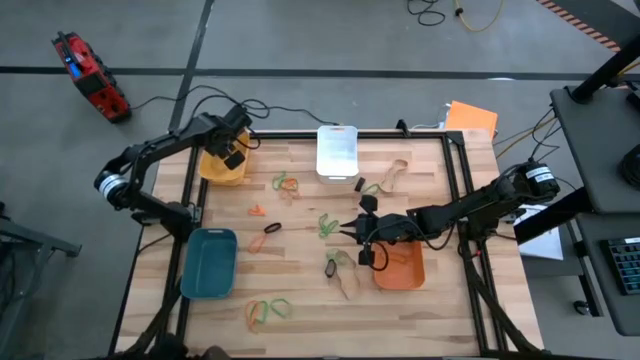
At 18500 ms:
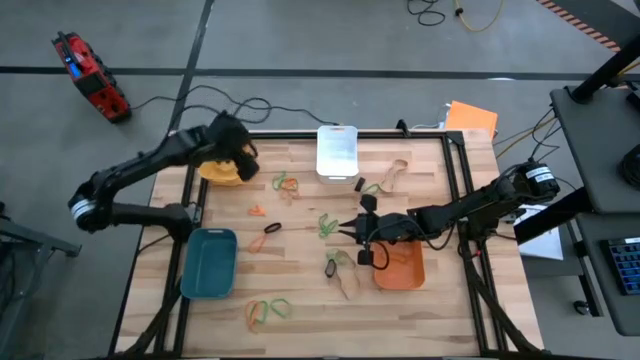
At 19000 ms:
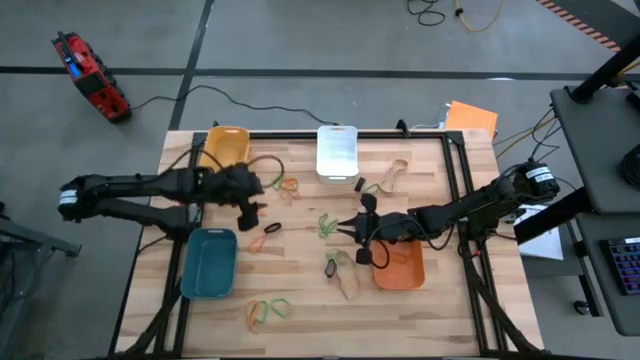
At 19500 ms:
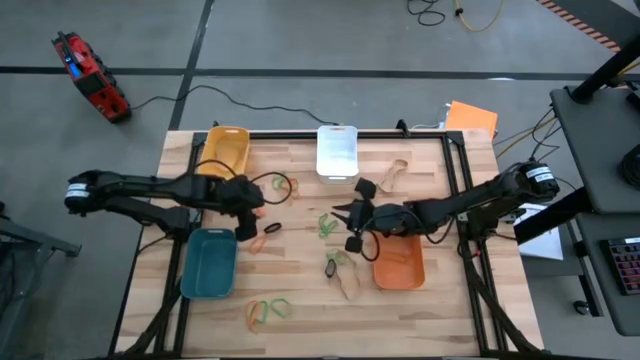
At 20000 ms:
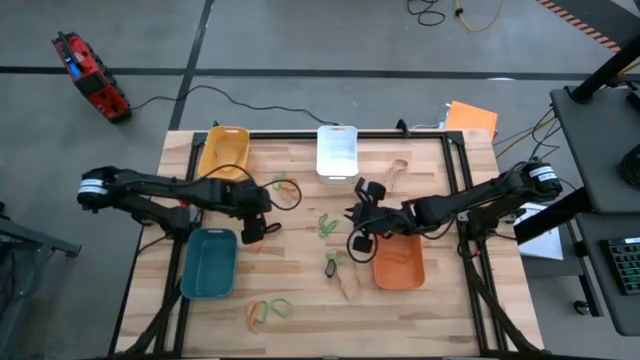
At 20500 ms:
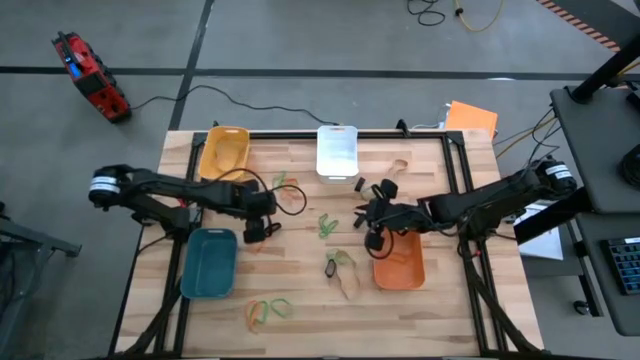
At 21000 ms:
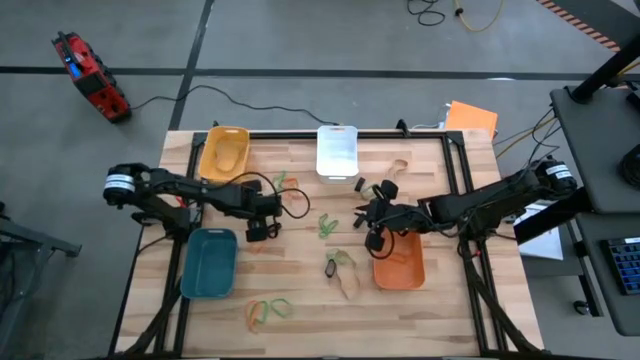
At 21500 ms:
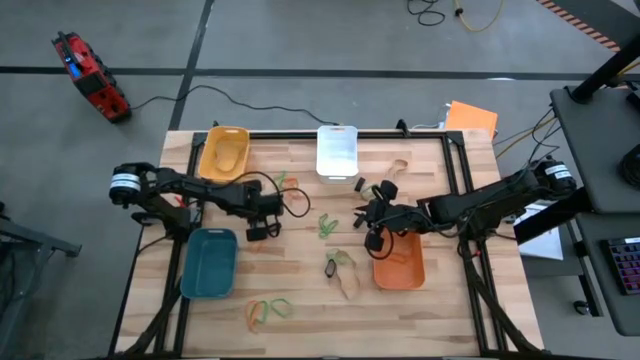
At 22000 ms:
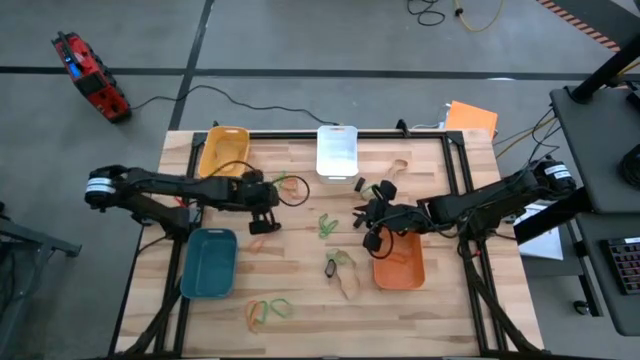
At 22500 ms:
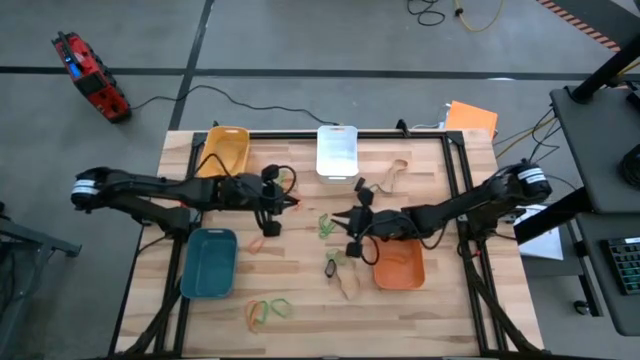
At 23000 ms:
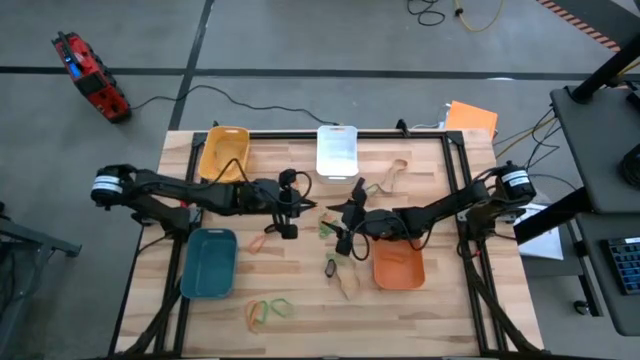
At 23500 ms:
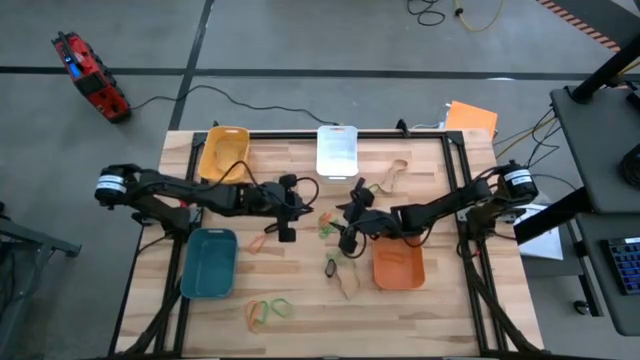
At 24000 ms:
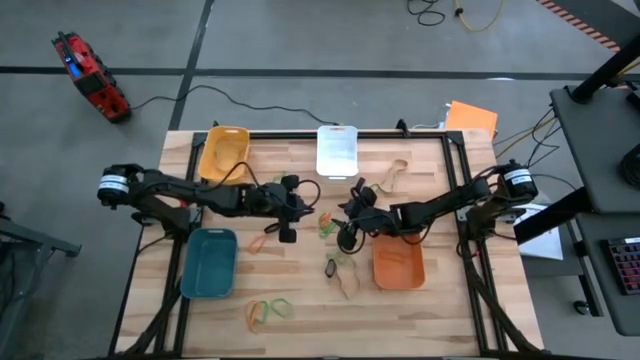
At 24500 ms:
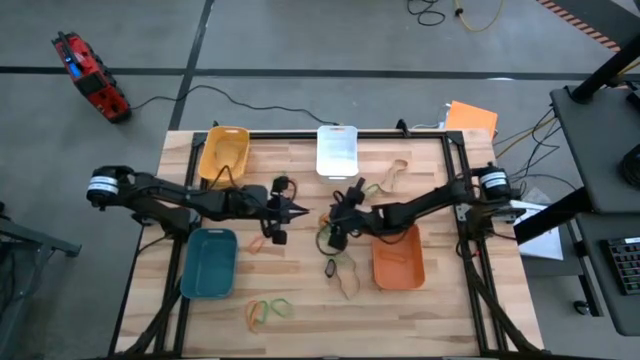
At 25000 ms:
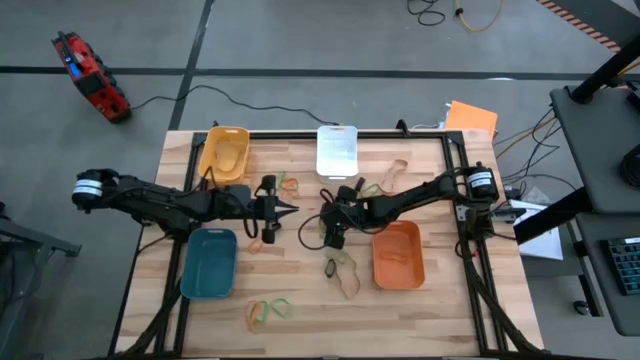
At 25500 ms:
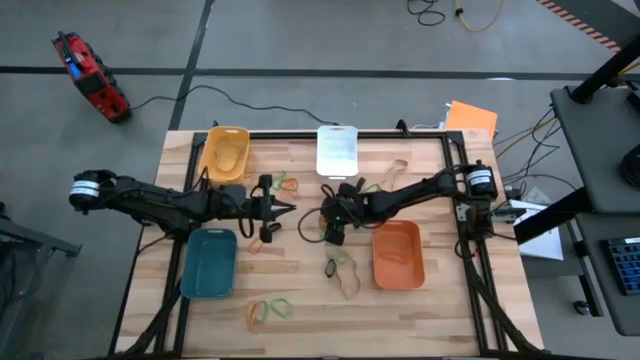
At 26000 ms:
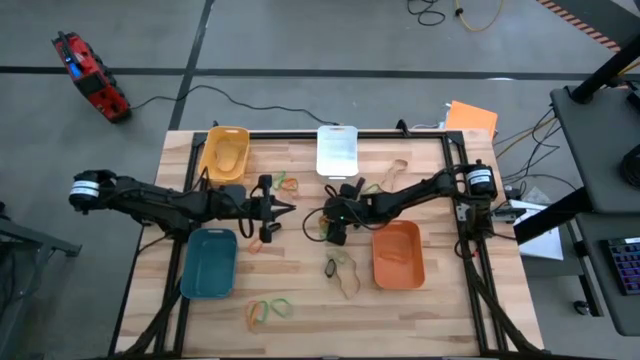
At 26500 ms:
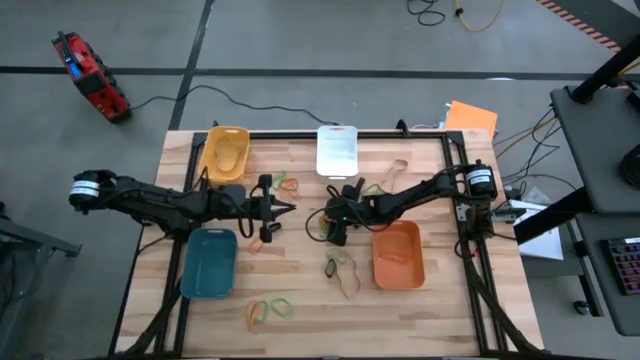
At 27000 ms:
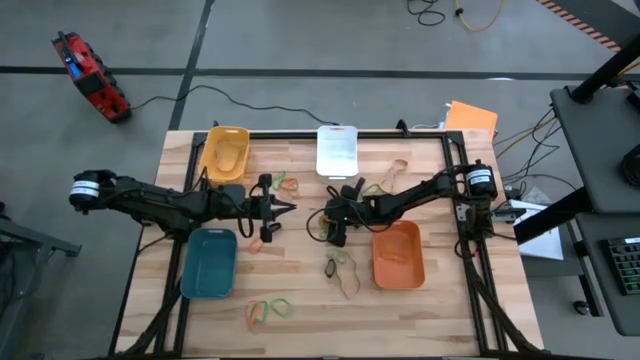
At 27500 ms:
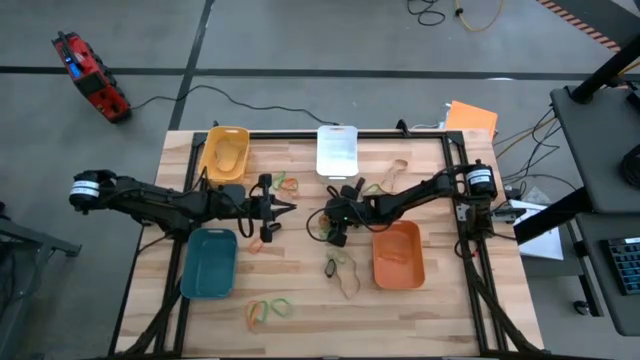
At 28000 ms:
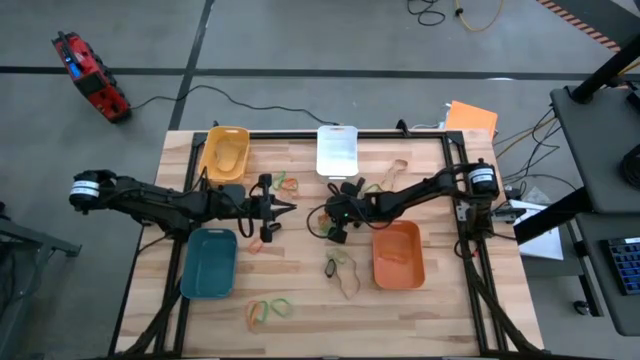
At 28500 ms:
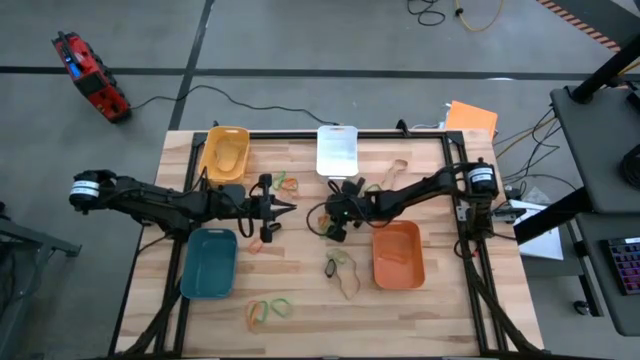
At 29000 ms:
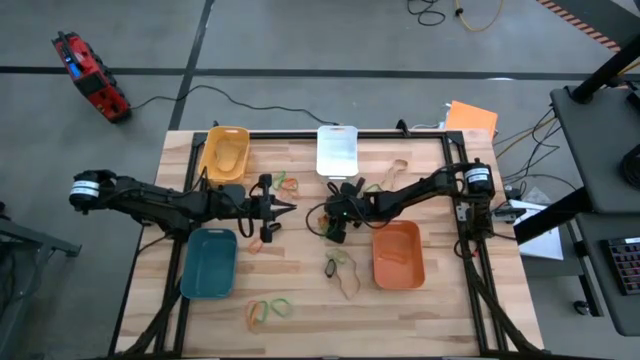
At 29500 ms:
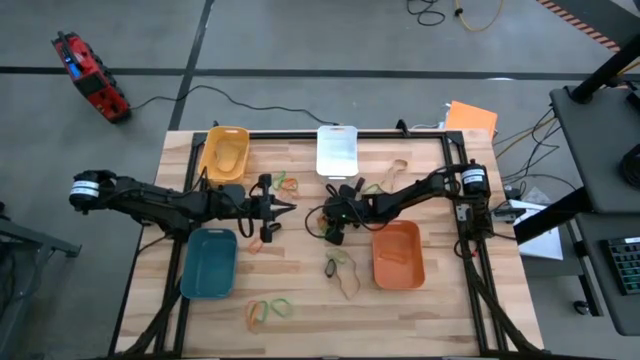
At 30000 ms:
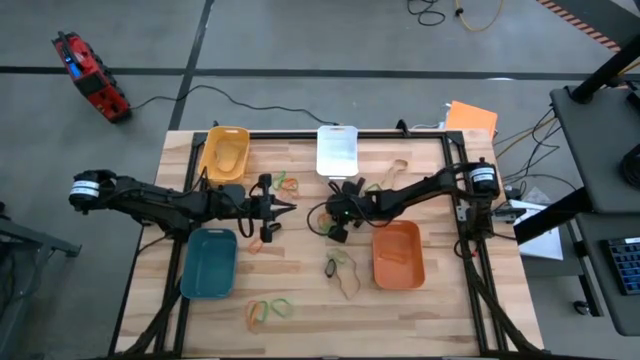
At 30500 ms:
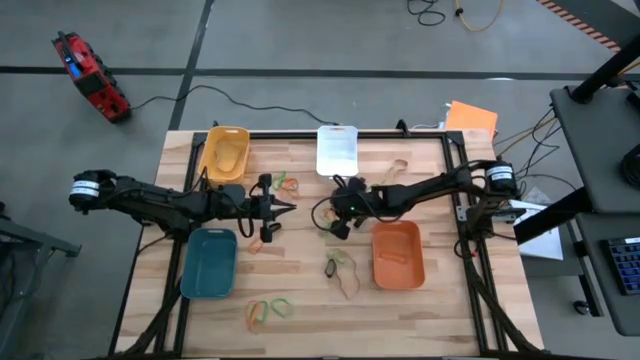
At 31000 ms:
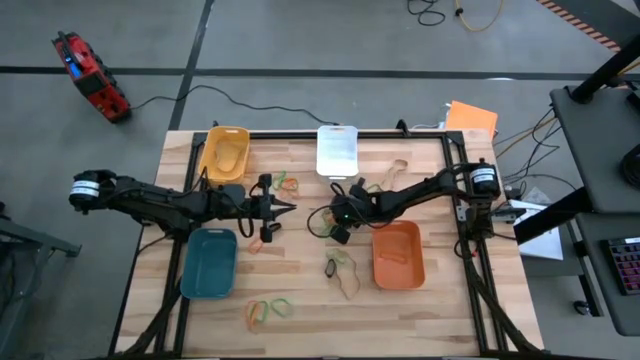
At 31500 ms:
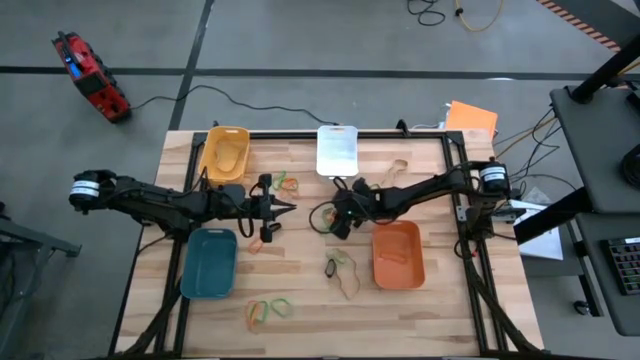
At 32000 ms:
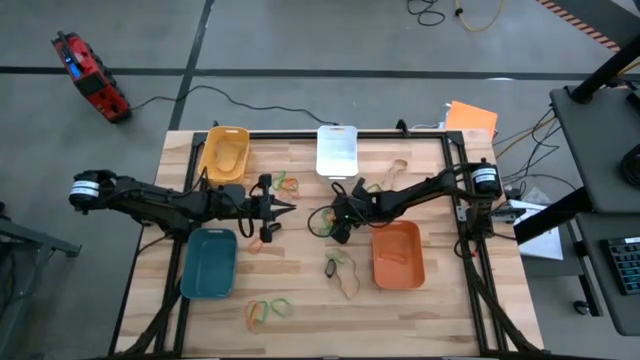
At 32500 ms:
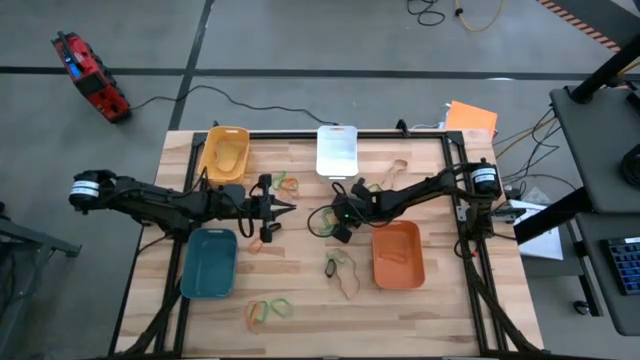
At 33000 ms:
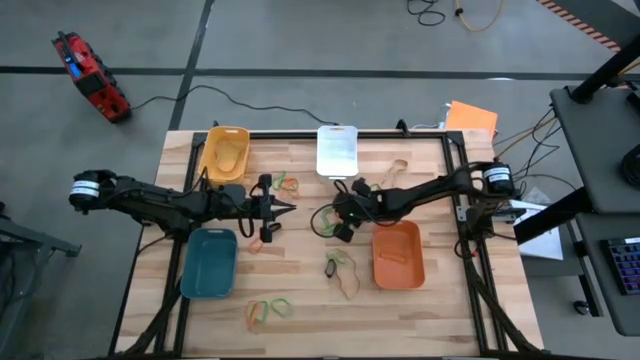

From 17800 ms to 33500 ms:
Task: Sort rubber bands into baskets
Put the orange rubber band into the orange bin

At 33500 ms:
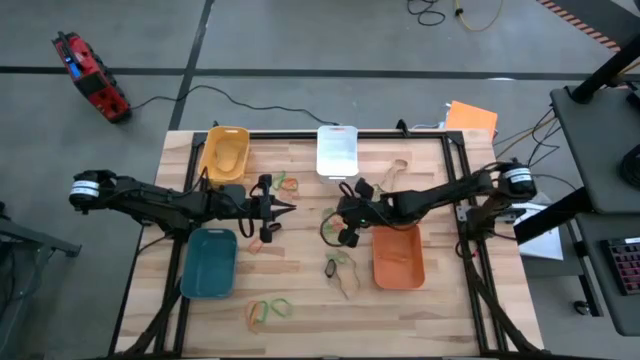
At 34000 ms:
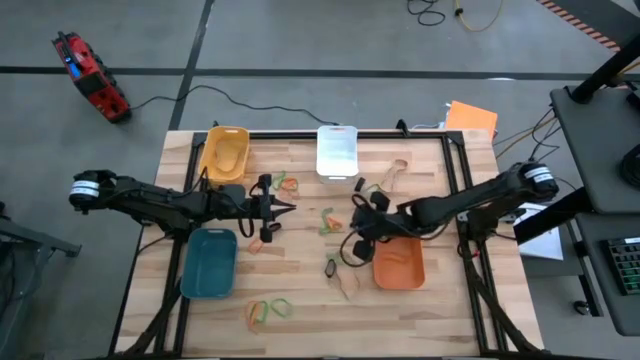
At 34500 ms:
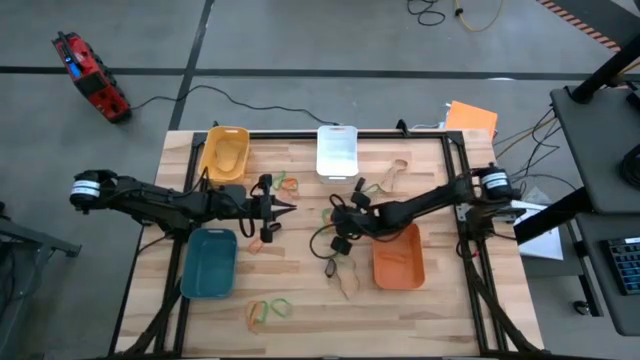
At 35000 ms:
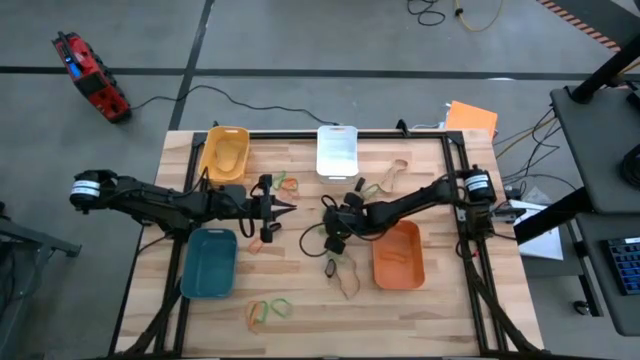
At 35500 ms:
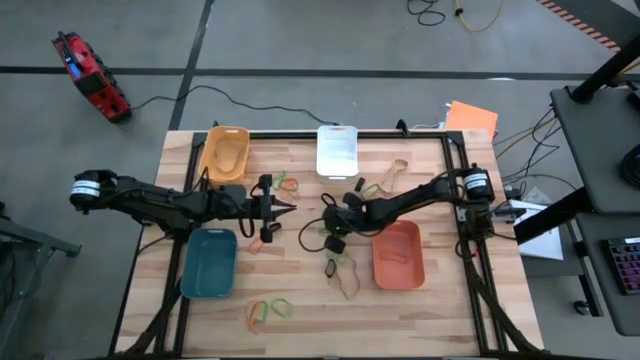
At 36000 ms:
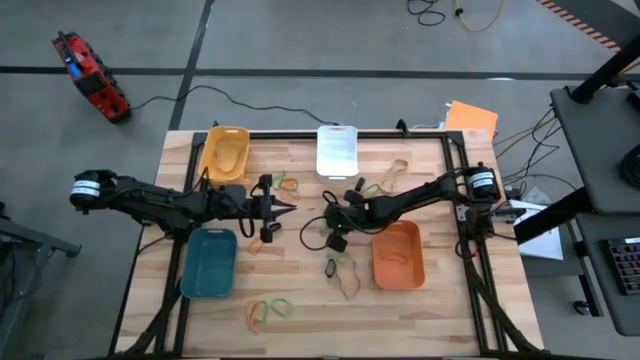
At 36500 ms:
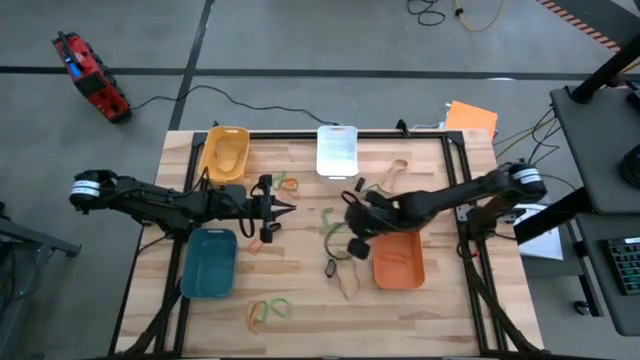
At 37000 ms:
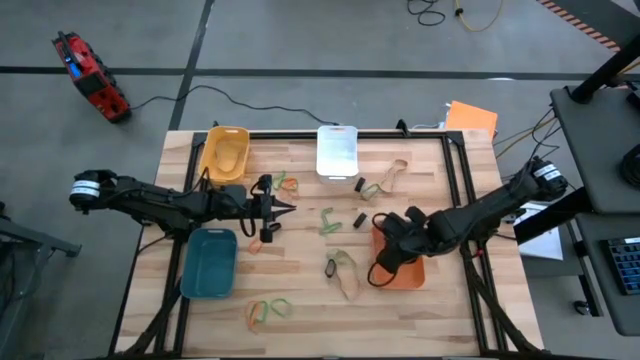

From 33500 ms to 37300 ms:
Put the orange rubber band into the orange bin

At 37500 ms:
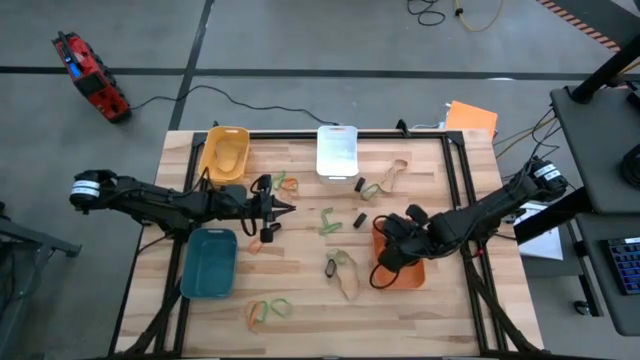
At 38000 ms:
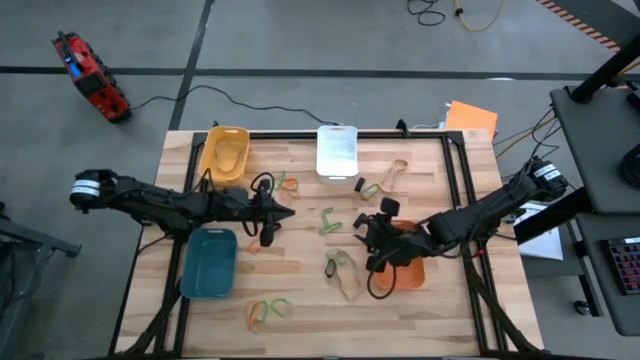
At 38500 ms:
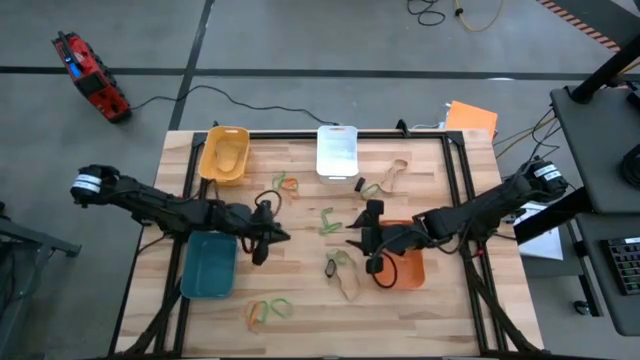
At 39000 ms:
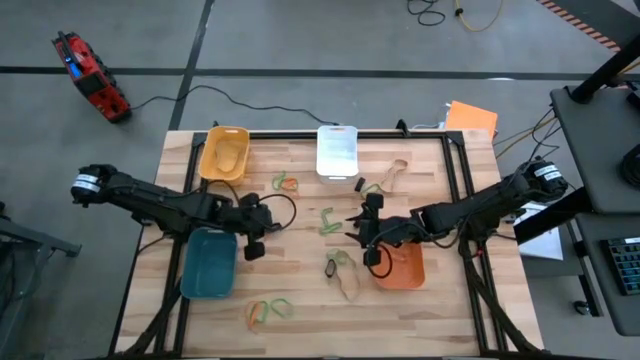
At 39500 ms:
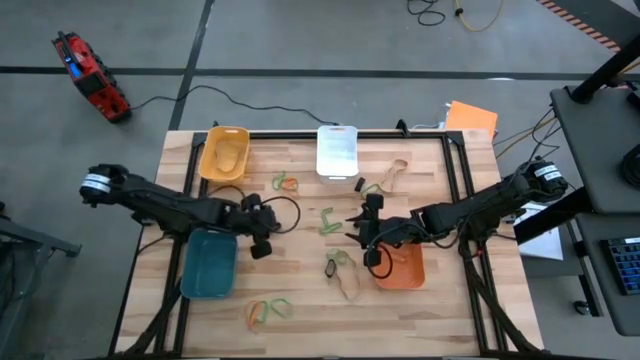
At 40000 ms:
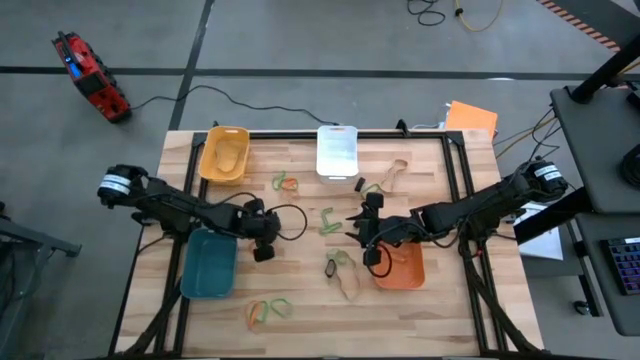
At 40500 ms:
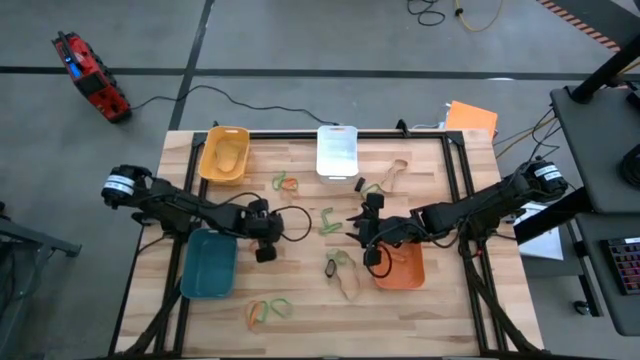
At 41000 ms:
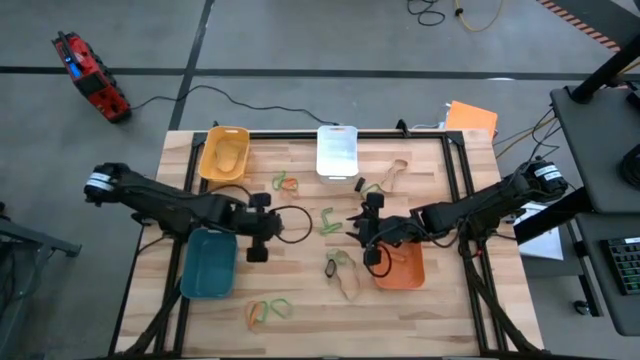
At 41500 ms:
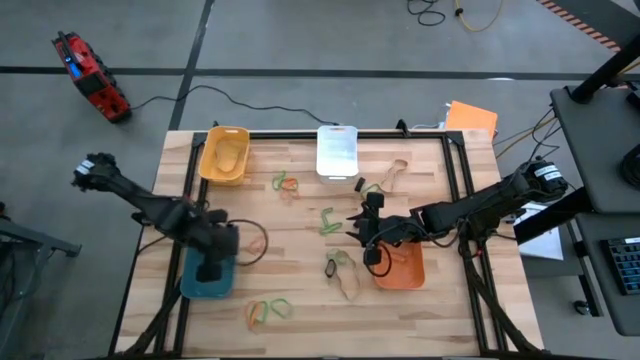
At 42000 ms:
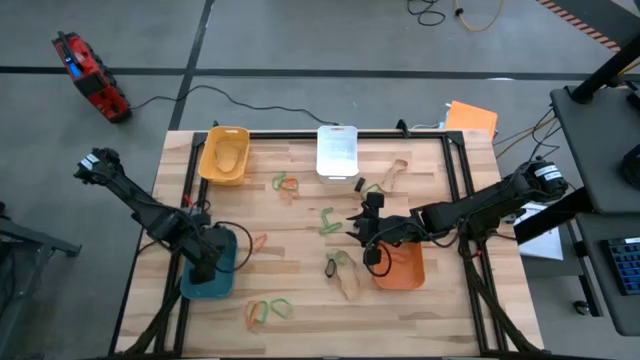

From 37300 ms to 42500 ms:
Put the black rubber band into the blue bin
